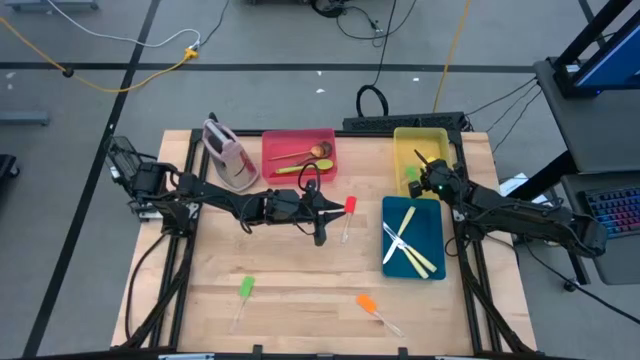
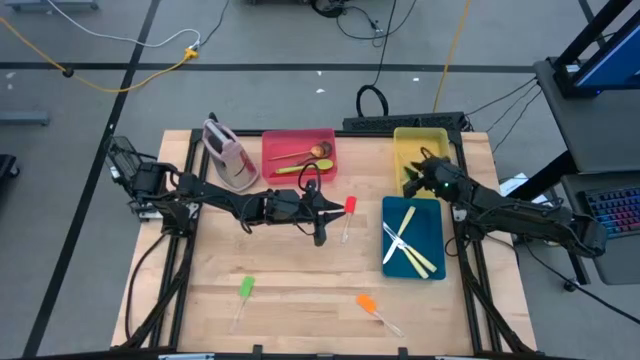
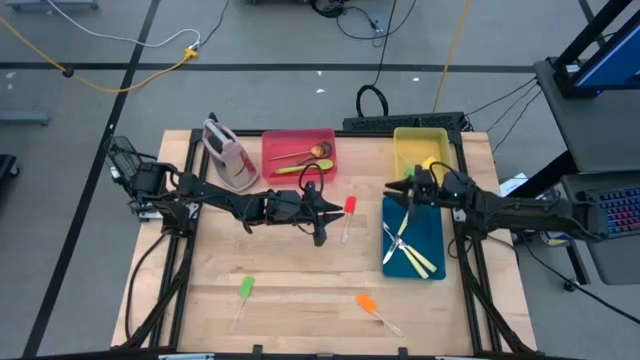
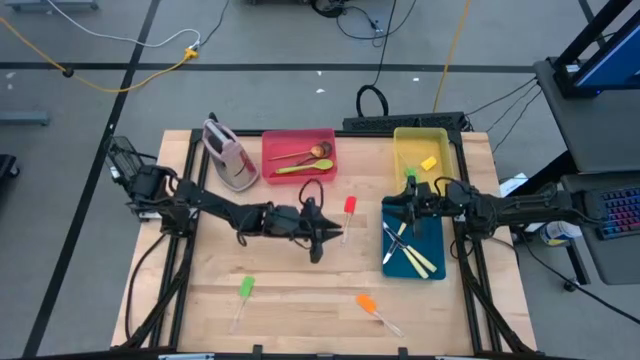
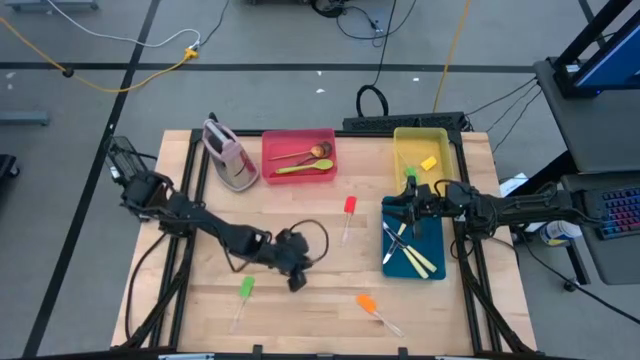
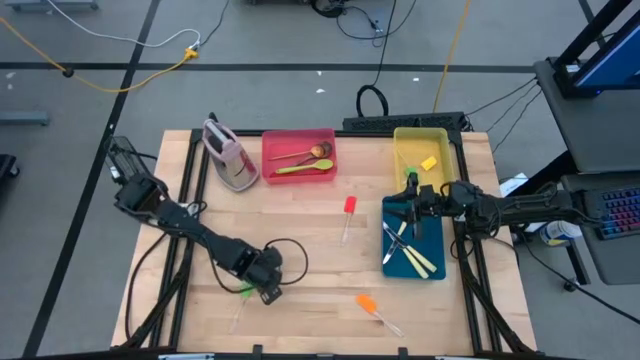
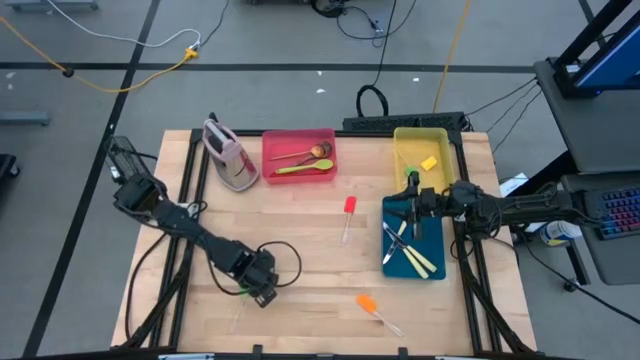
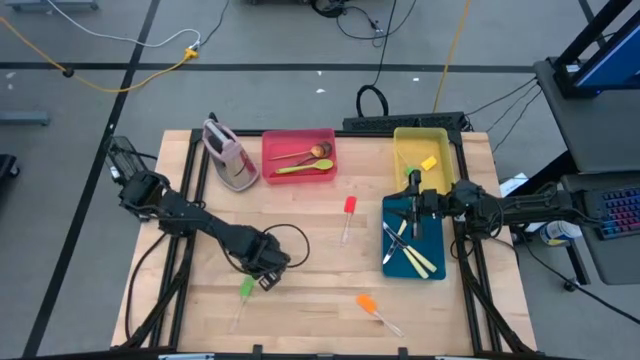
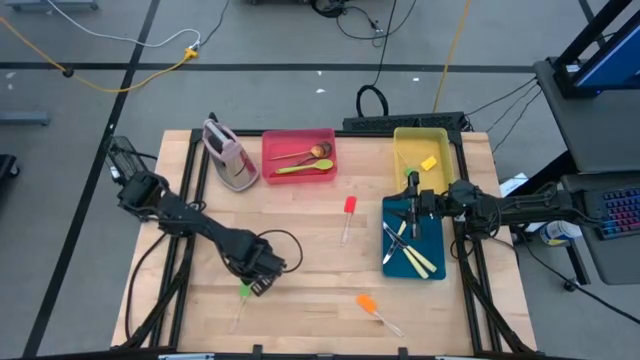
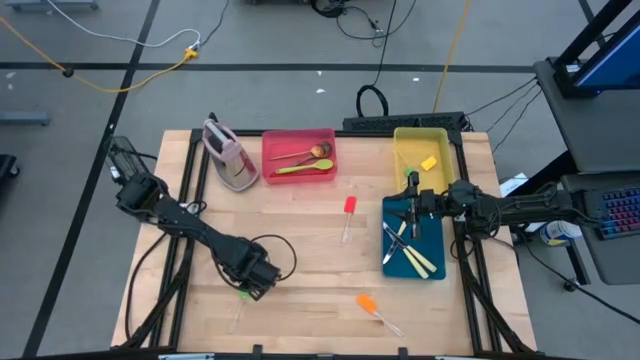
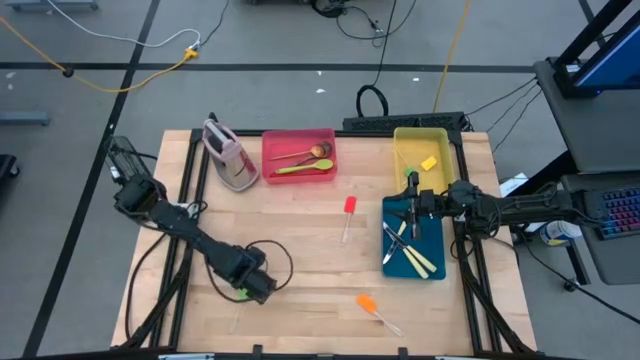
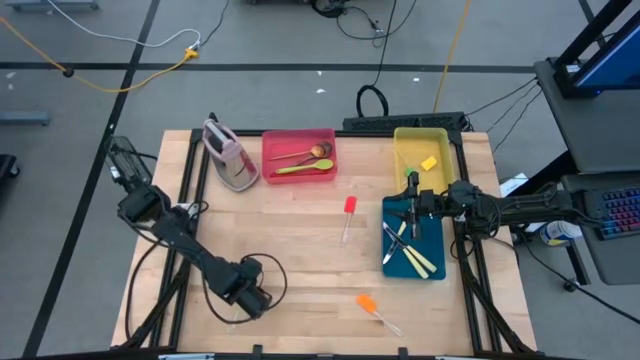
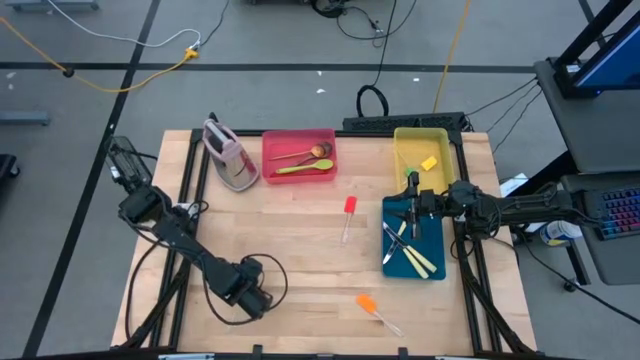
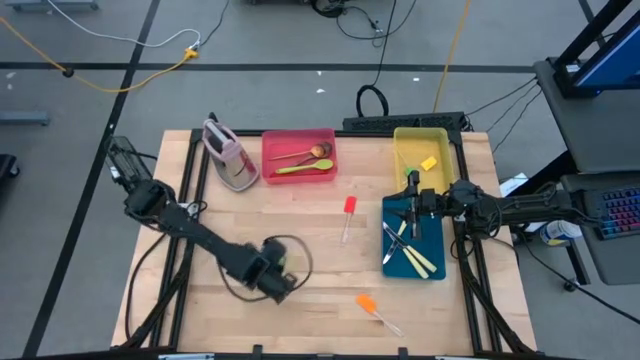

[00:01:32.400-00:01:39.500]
Task: Pick & Place Kitchen Items
Put the green spatula into the yellow bin

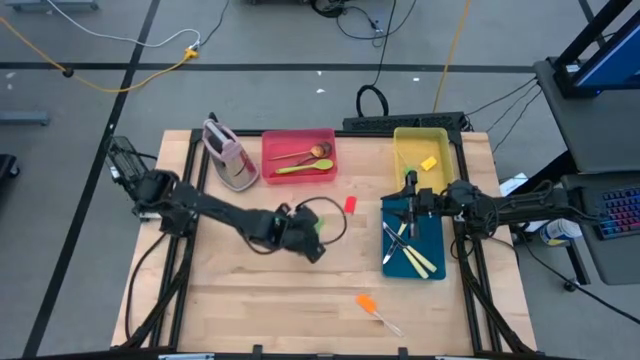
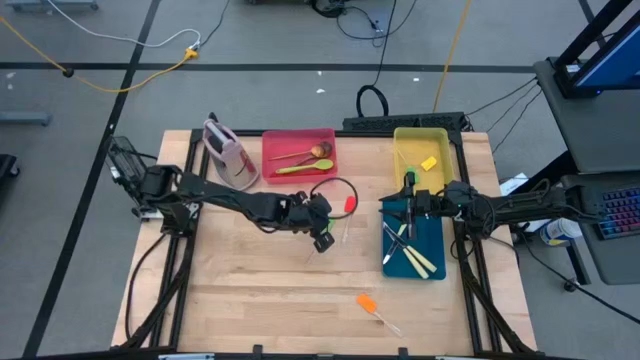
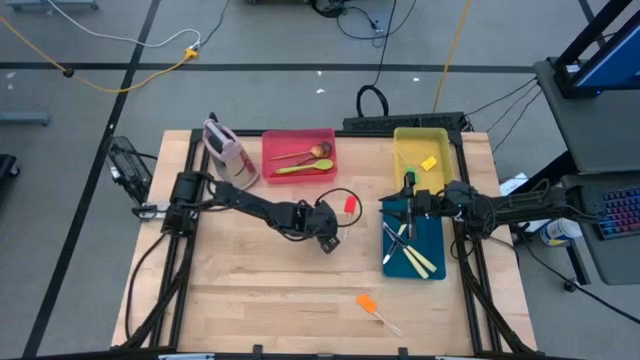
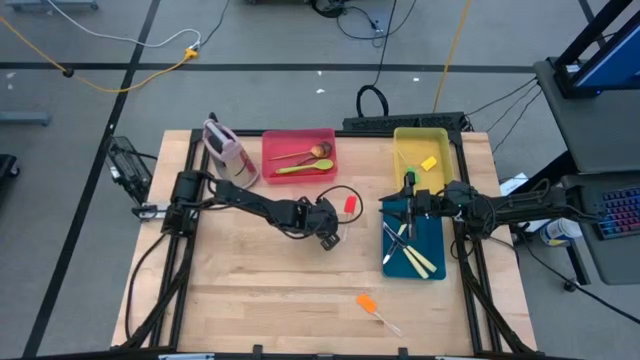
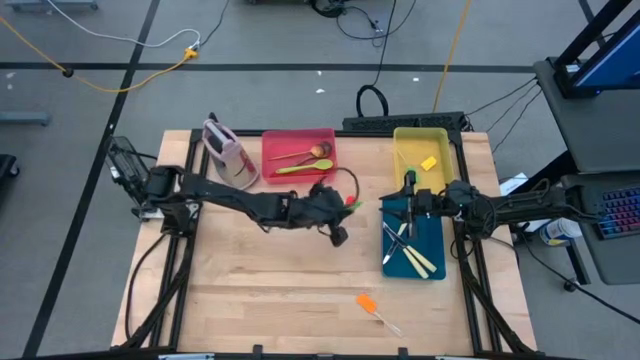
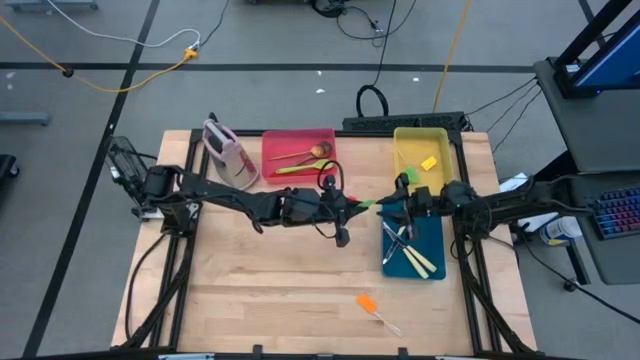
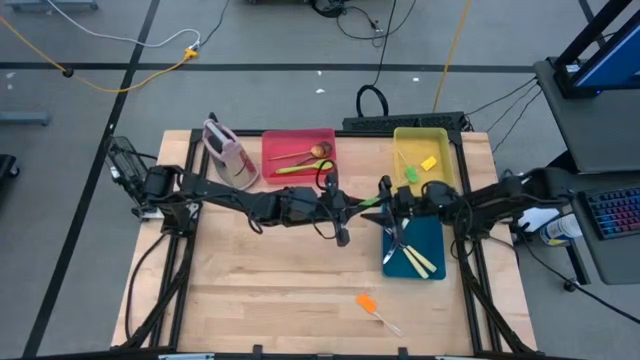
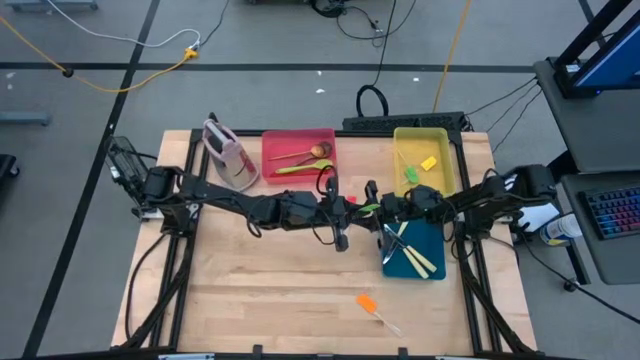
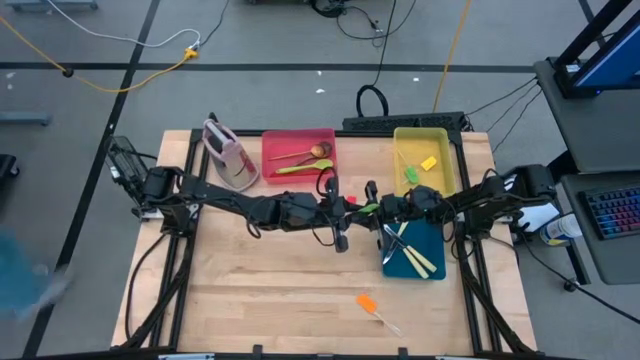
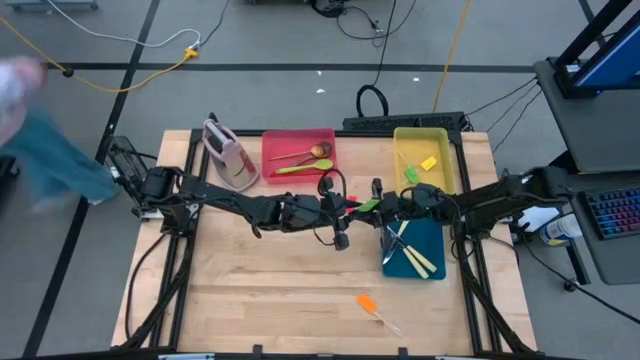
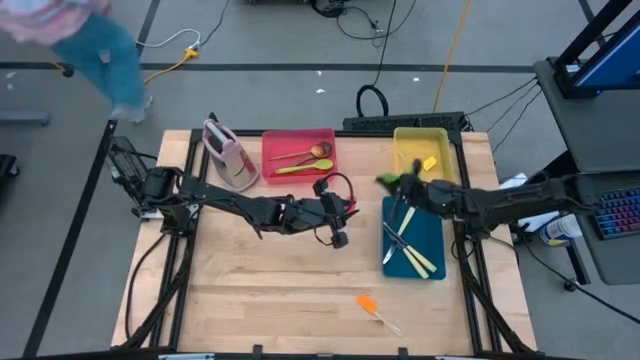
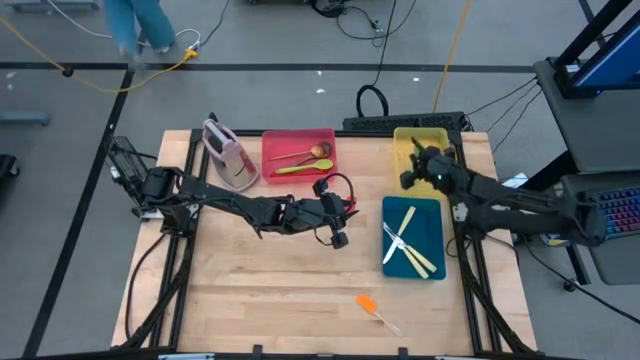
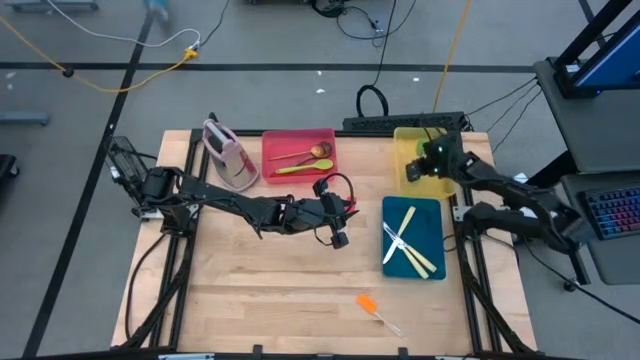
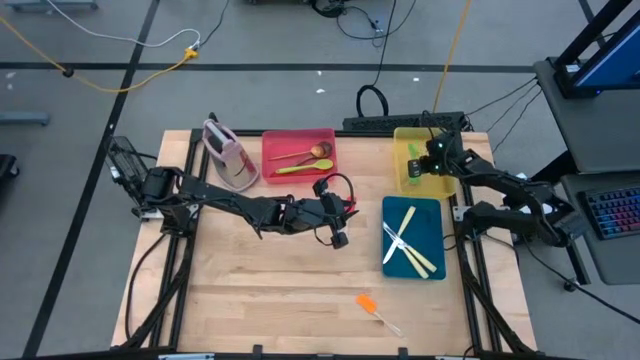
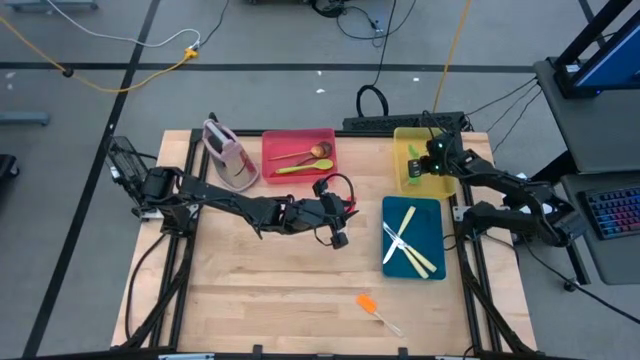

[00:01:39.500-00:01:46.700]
Put the green spatula into the yellow bin

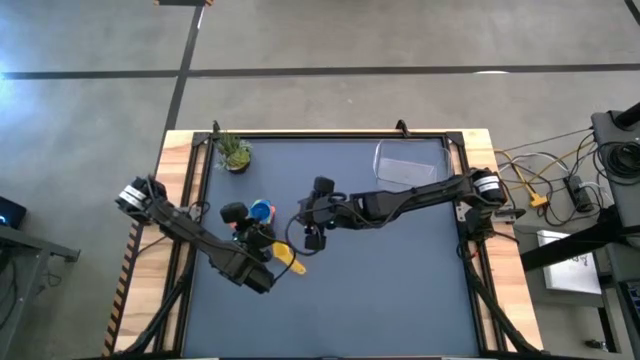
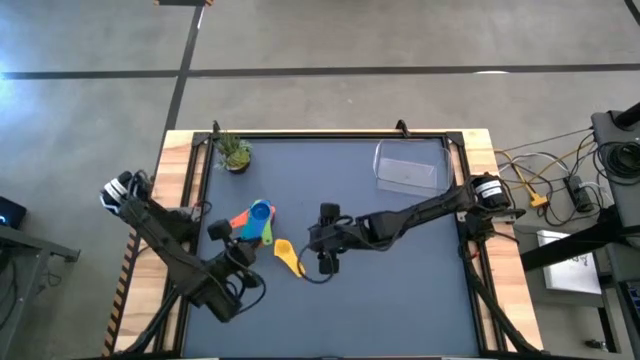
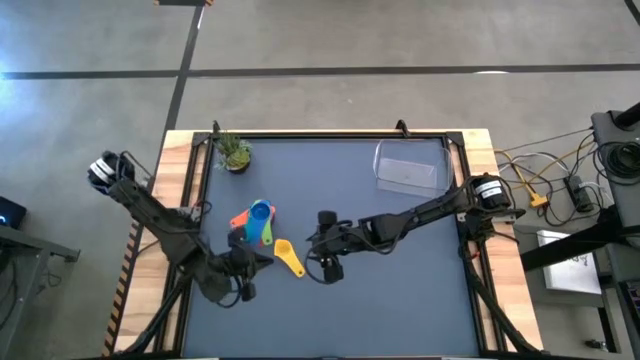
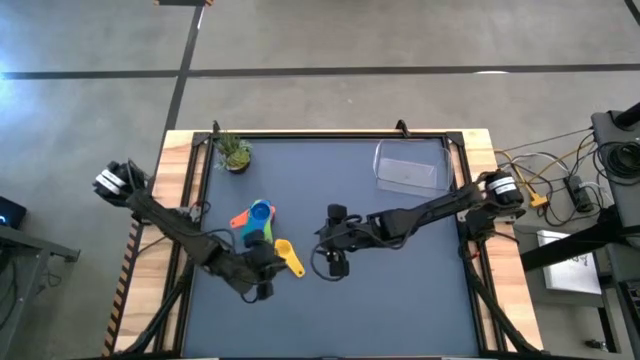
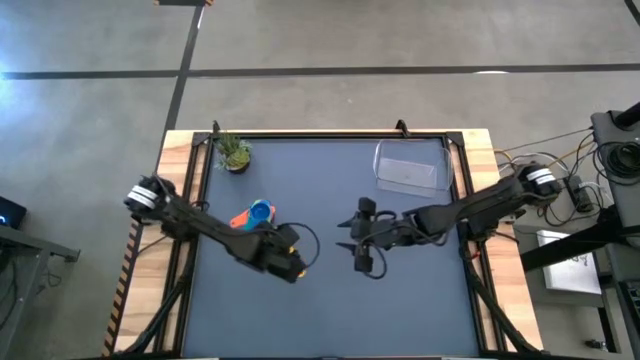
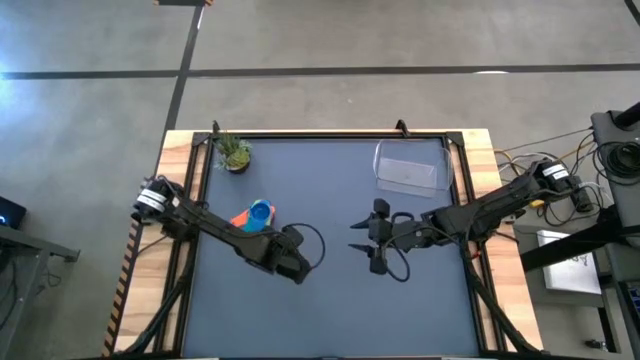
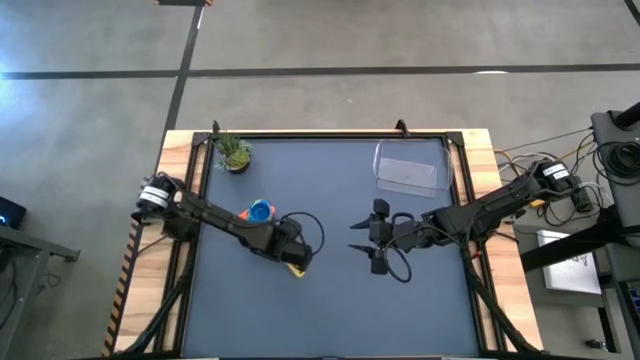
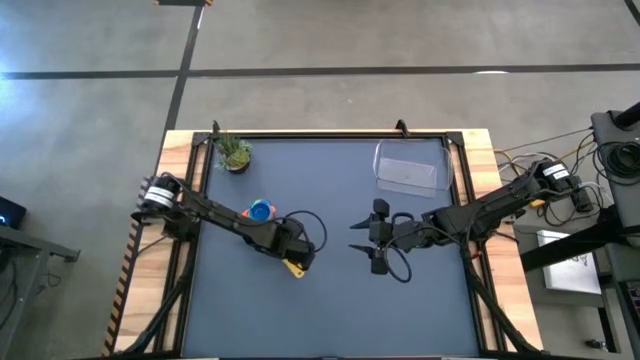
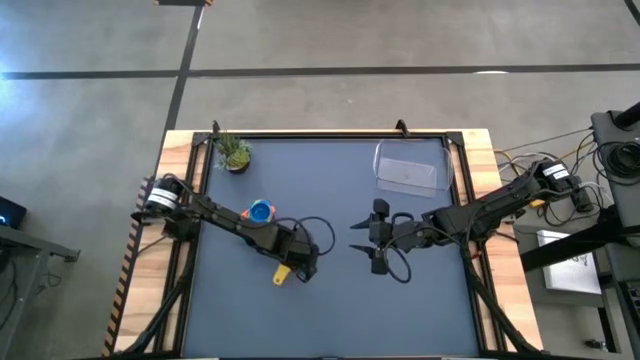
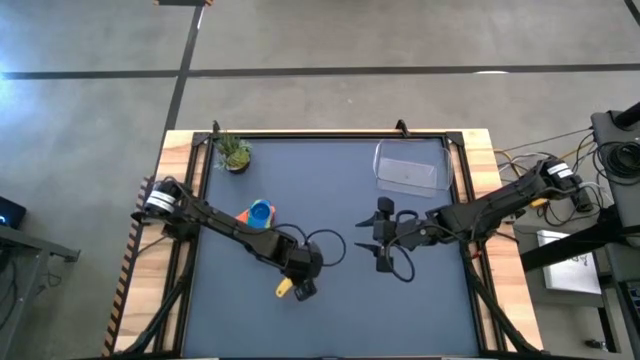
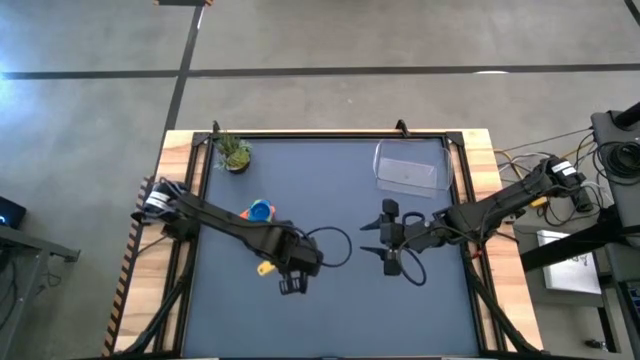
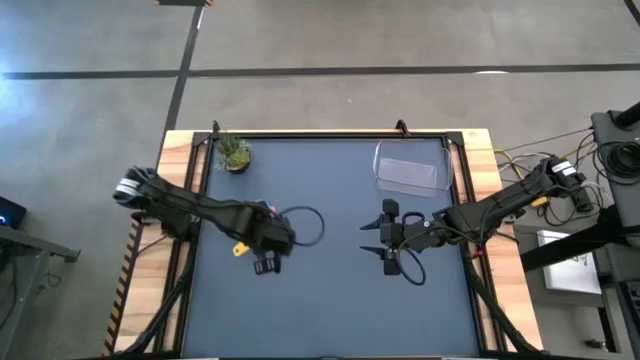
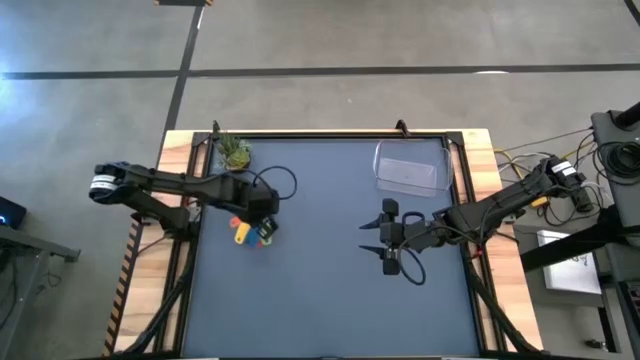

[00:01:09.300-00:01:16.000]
Task: Nest measuring cups in basket
Stack the yellow measuring cup on top of the dark blue measuring cup
